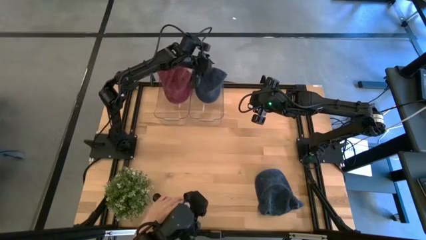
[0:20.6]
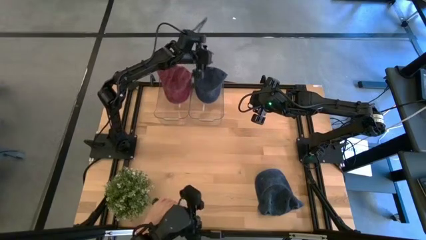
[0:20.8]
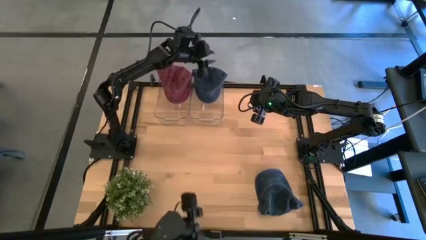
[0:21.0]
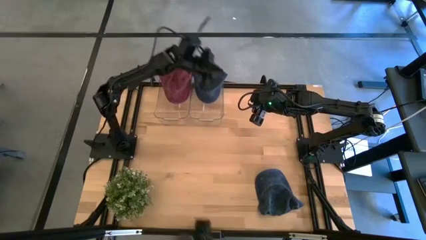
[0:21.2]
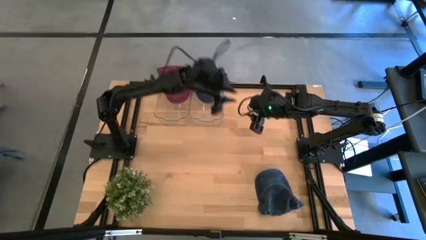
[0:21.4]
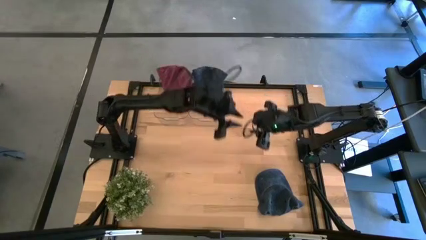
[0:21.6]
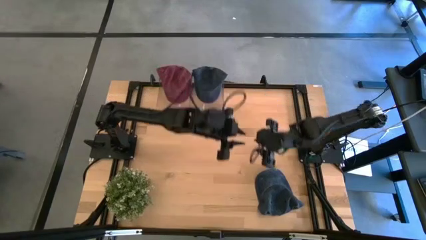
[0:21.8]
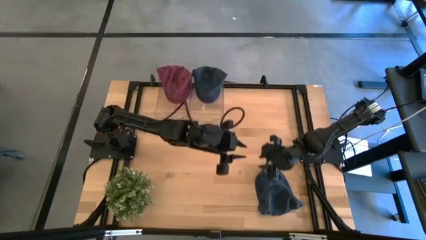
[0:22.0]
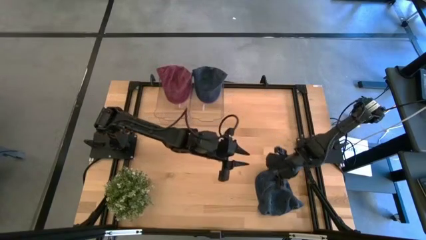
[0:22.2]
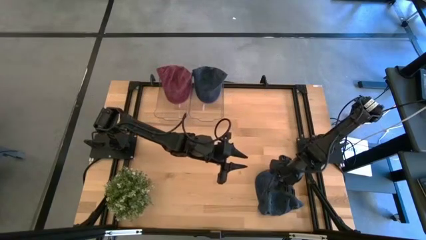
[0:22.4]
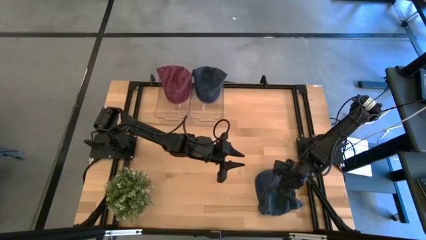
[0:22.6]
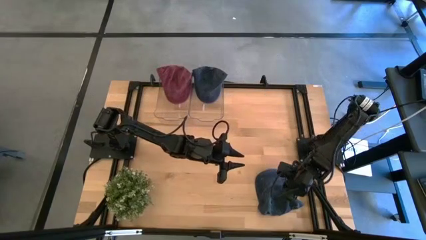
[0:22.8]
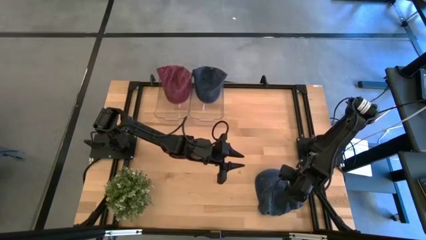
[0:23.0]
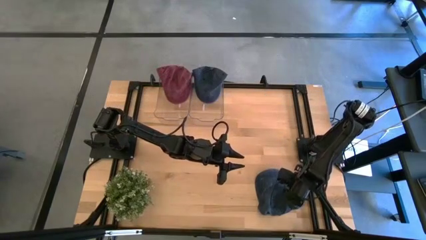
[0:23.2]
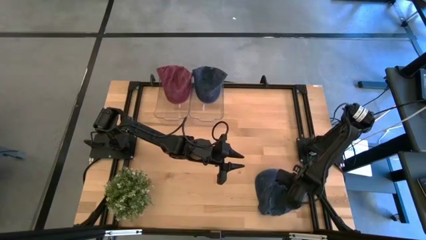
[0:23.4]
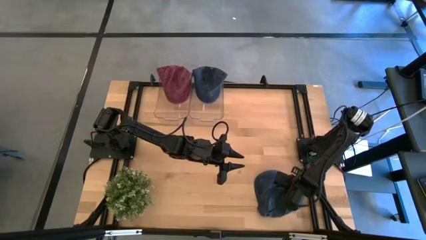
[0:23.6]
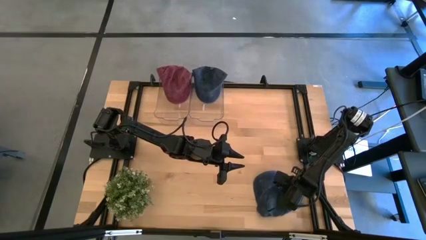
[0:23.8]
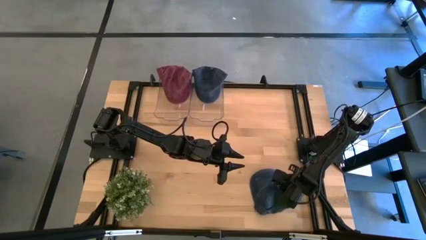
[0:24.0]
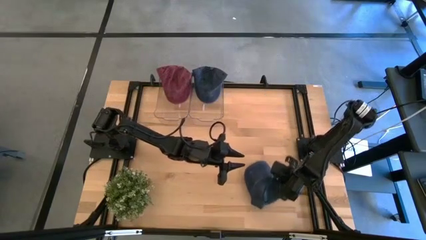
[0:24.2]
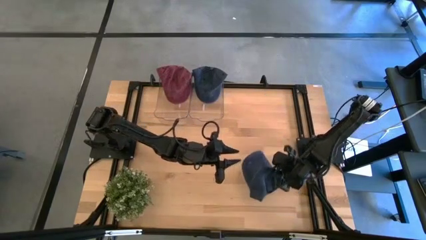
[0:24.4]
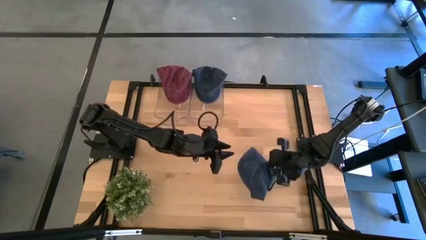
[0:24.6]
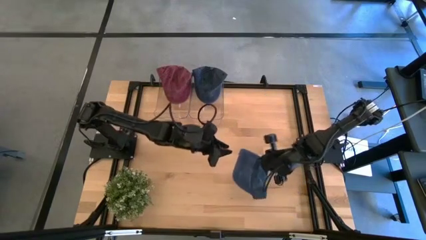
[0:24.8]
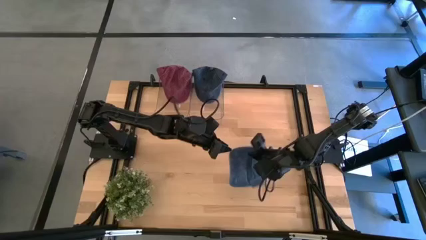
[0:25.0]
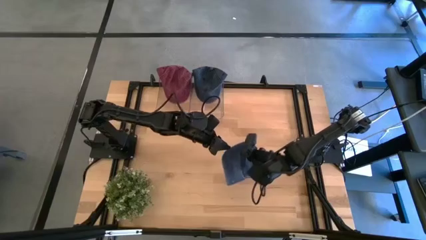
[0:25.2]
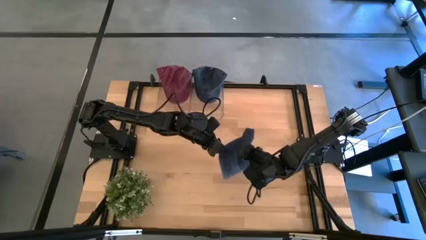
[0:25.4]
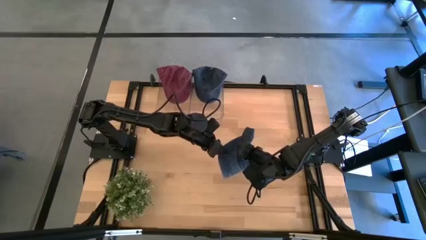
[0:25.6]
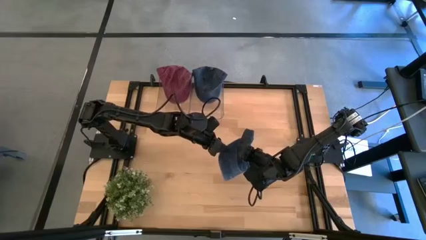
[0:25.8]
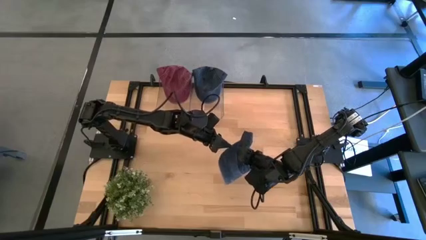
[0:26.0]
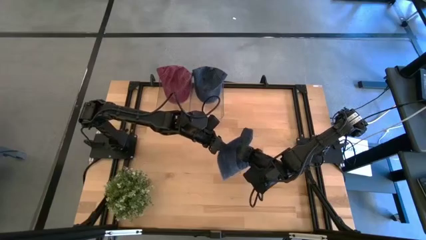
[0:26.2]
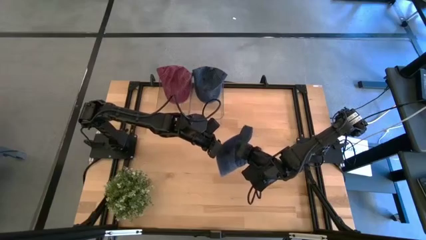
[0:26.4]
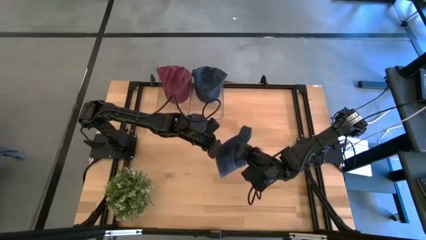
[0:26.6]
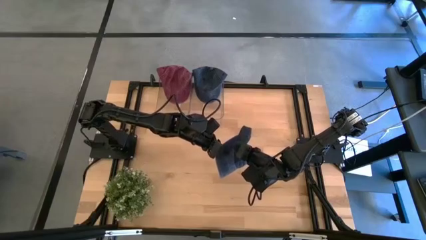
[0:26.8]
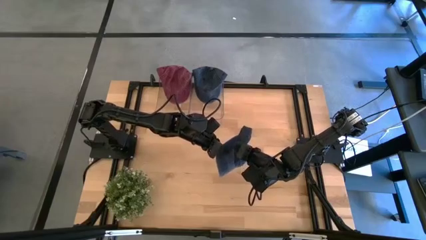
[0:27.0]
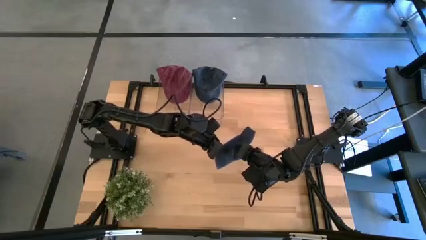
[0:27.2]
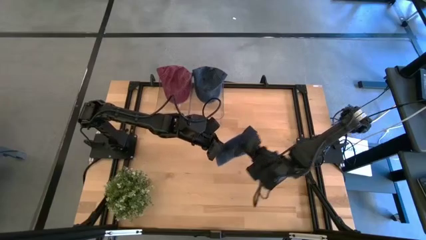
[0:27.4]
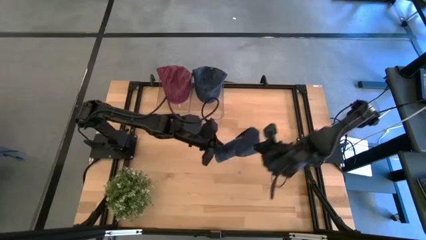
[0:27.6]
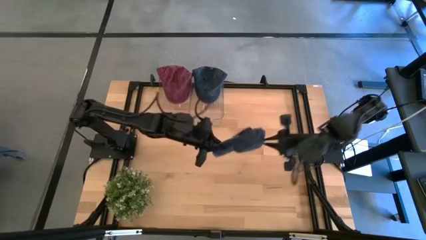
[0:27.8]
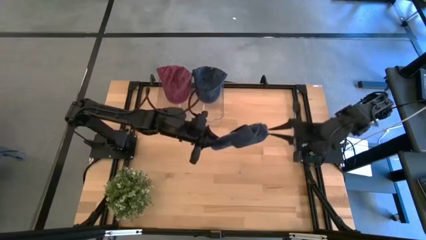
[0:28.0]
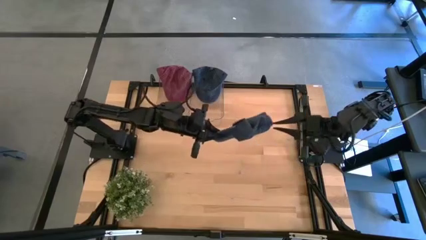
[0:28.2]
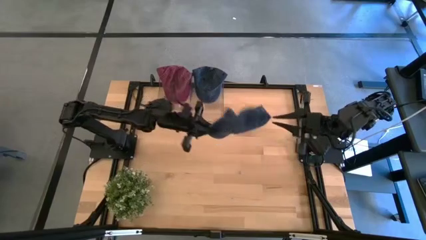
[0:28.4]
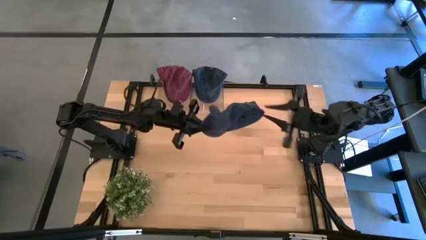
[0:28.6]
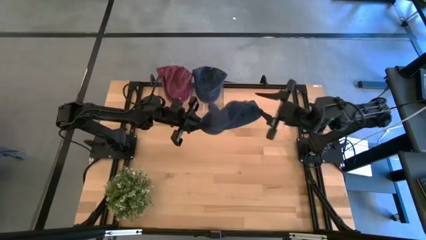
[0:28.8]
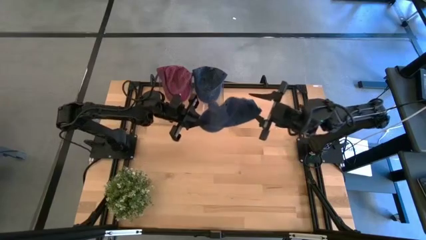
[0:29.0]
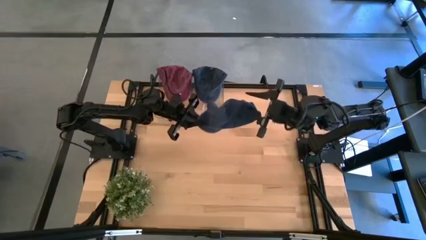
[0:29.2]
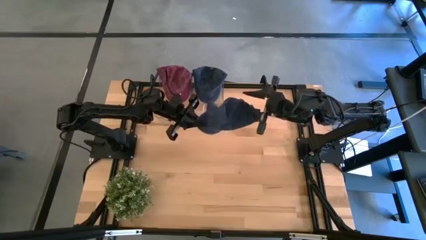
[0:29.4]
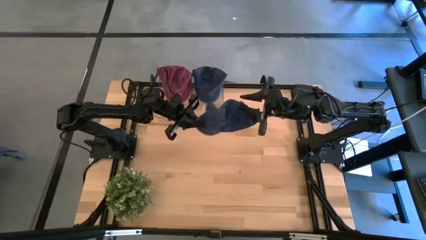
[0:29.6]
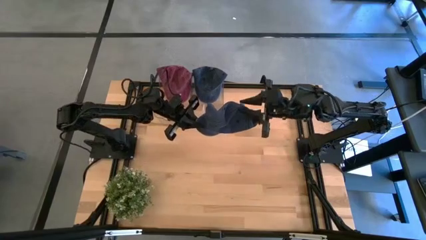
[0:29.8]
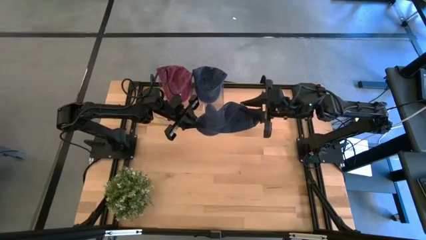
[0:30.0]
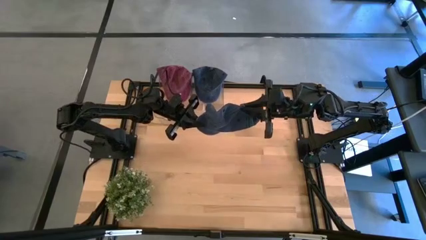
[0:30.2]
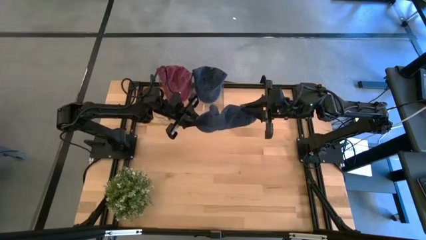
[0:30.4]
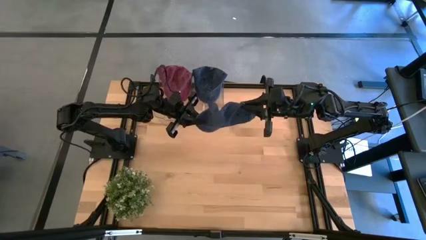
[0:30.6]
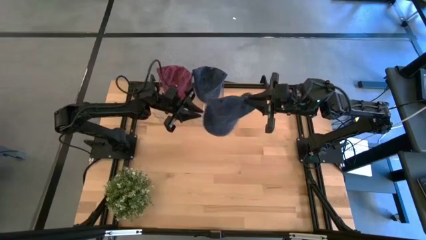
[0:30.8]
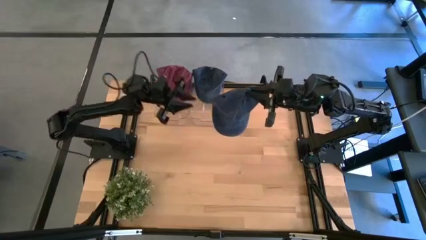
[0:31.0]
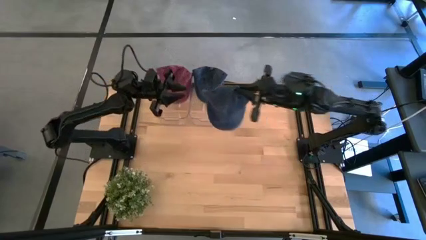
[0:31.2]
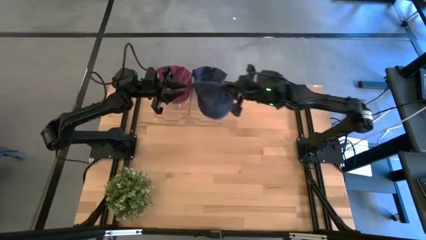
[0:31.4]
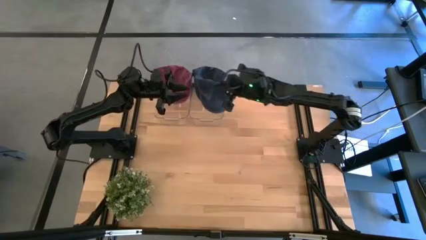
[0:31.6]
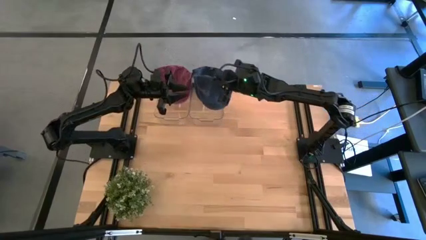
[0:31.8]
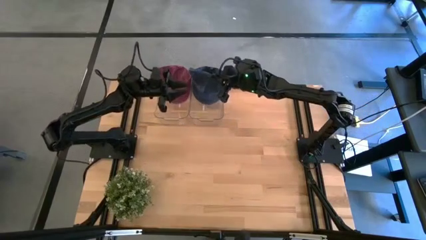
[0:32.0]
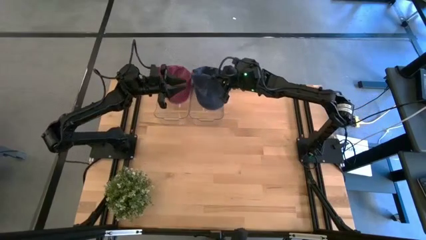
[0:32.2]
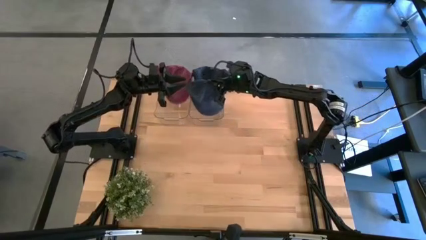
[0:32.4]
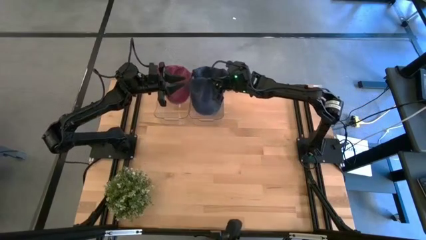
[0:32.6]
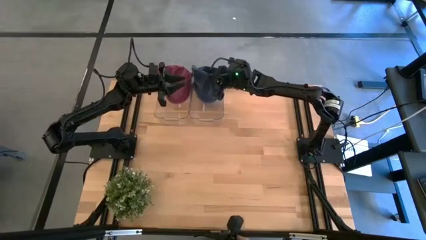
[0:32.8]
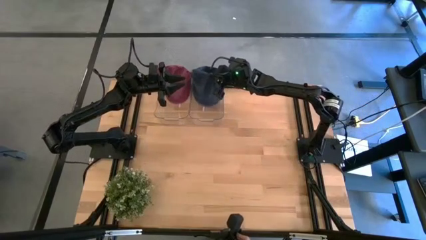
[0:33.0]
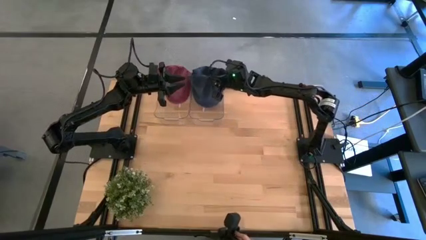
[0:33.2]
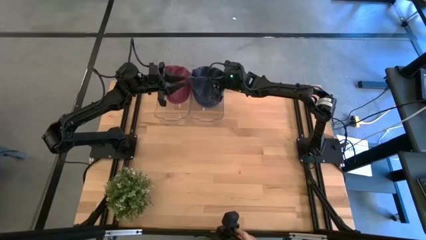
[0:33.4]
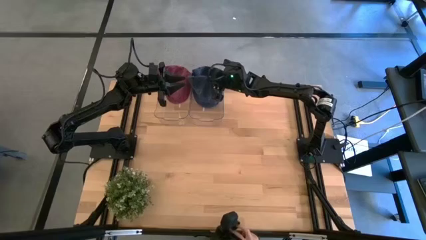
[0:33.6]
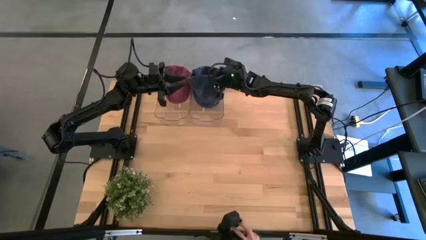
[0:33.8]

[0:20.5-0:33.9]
Task: Pick & Place hat
Put the blue cap into the right transparent bin
